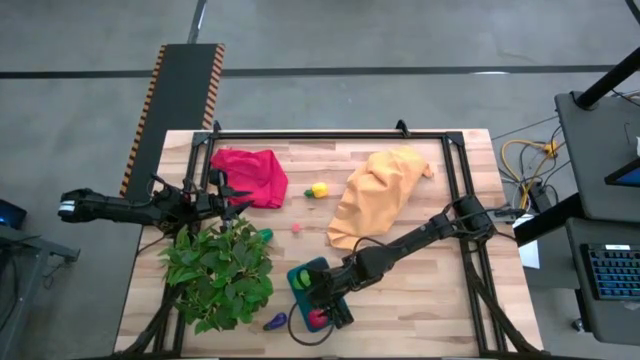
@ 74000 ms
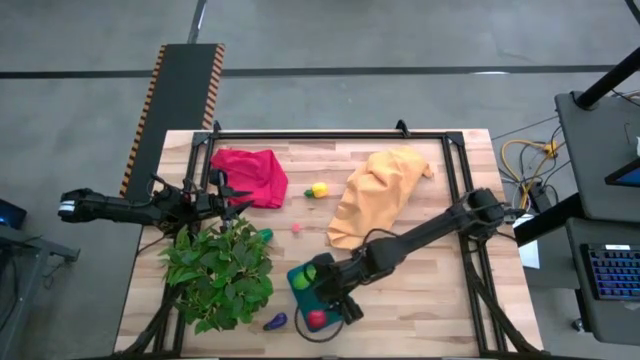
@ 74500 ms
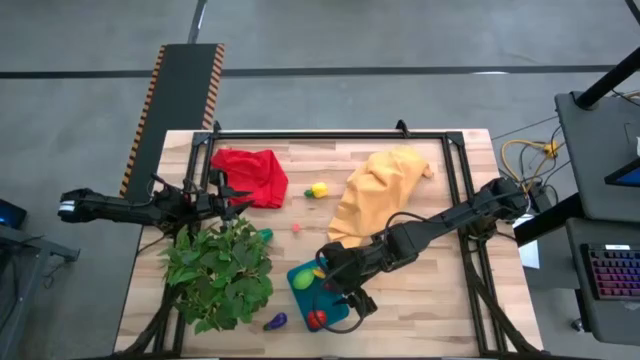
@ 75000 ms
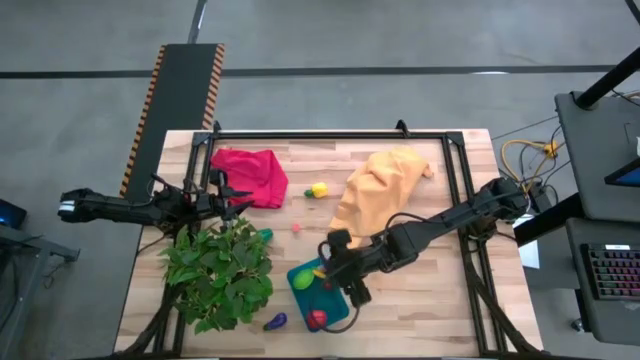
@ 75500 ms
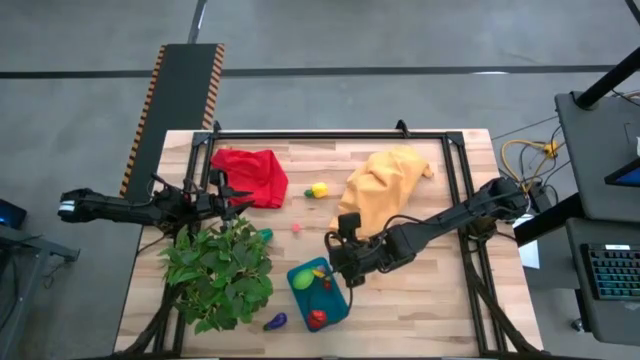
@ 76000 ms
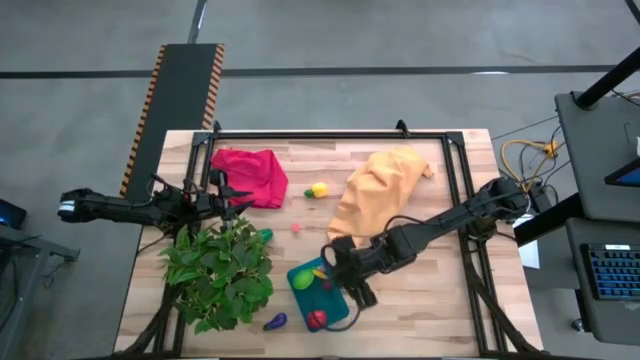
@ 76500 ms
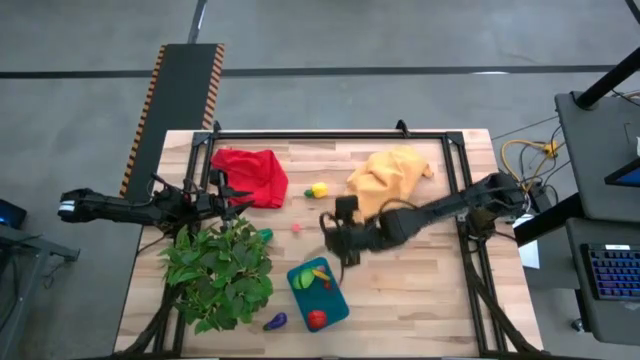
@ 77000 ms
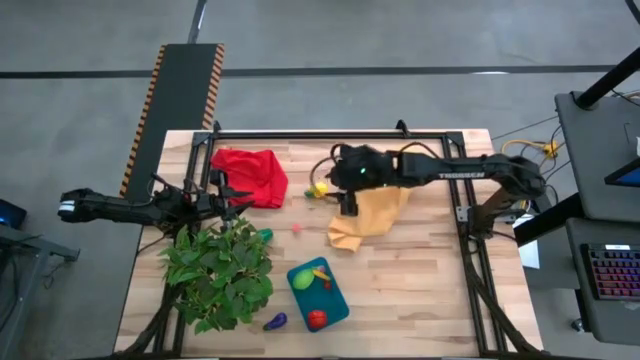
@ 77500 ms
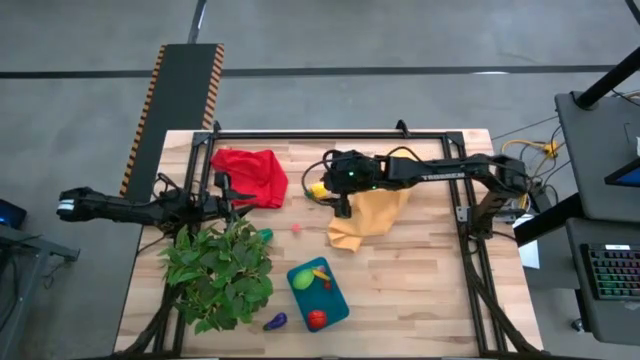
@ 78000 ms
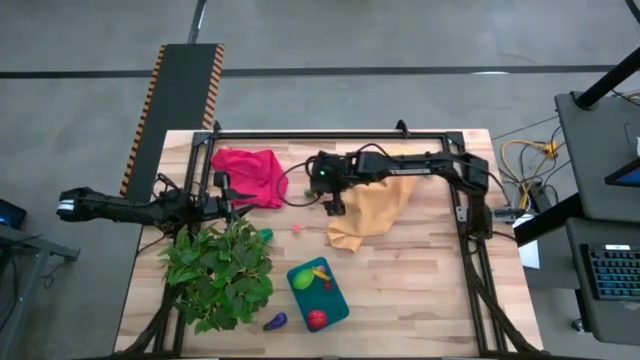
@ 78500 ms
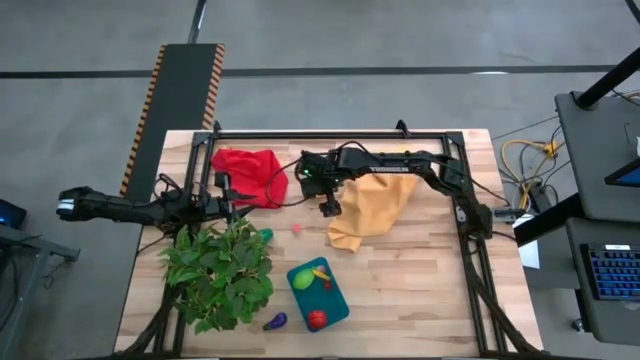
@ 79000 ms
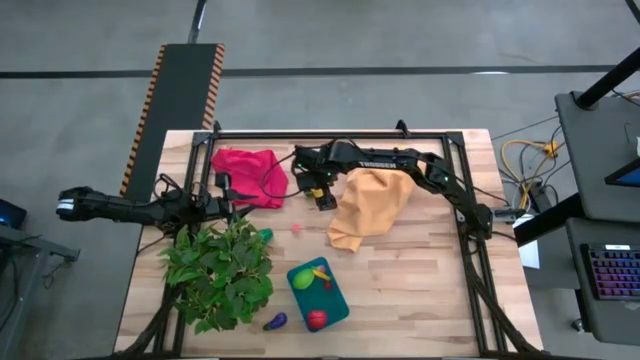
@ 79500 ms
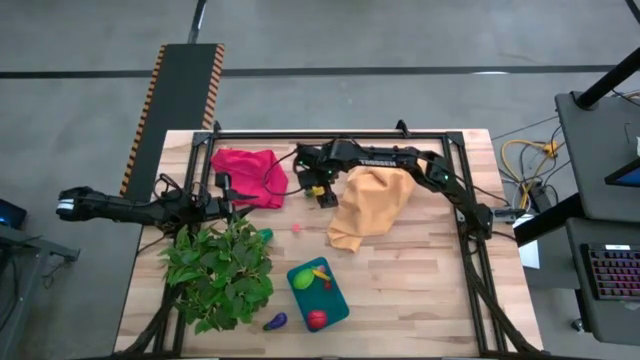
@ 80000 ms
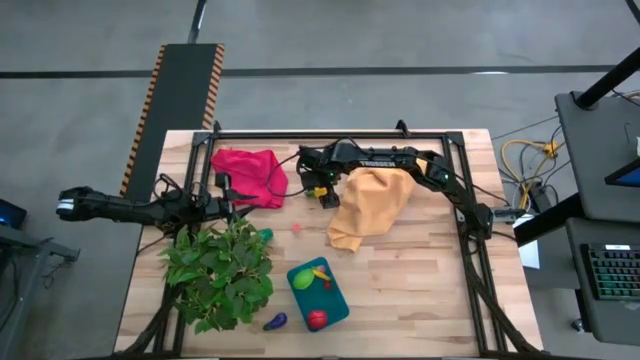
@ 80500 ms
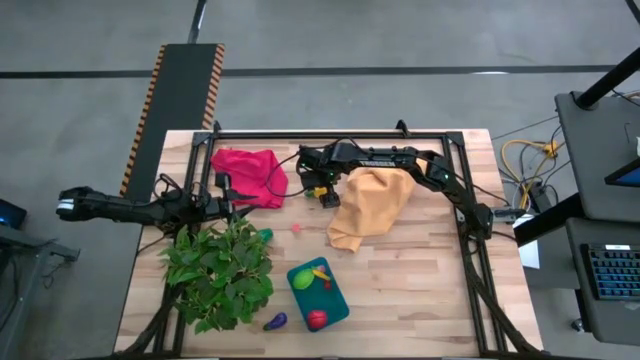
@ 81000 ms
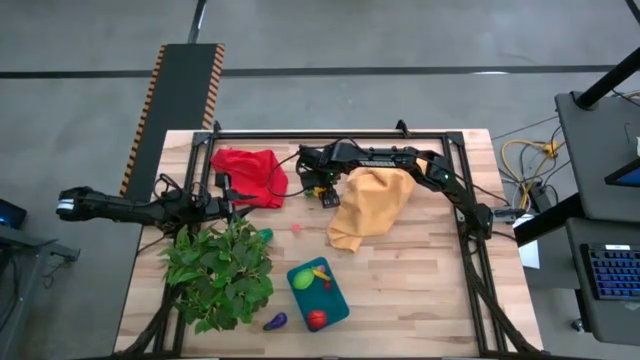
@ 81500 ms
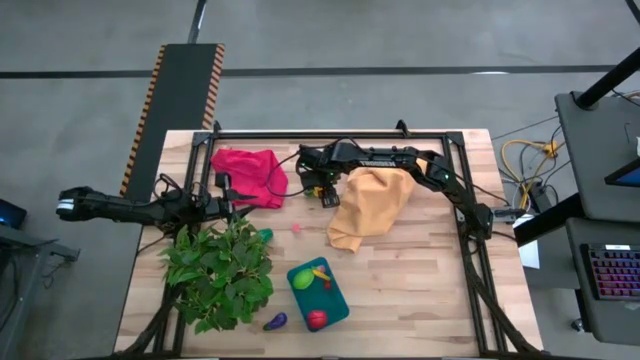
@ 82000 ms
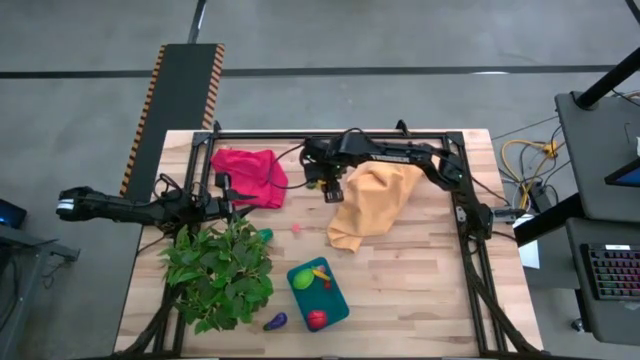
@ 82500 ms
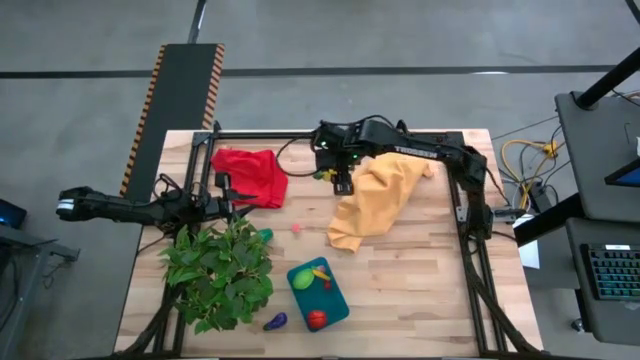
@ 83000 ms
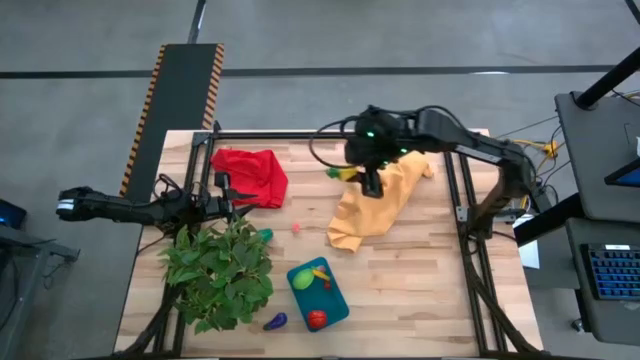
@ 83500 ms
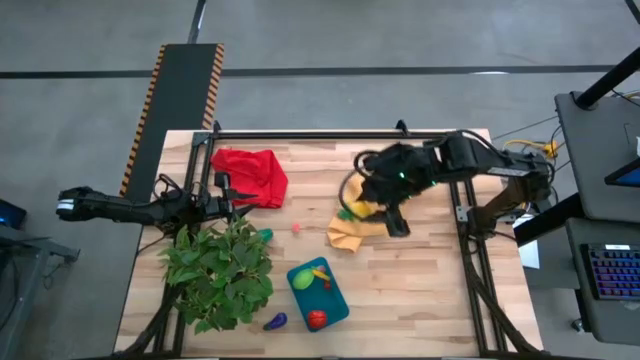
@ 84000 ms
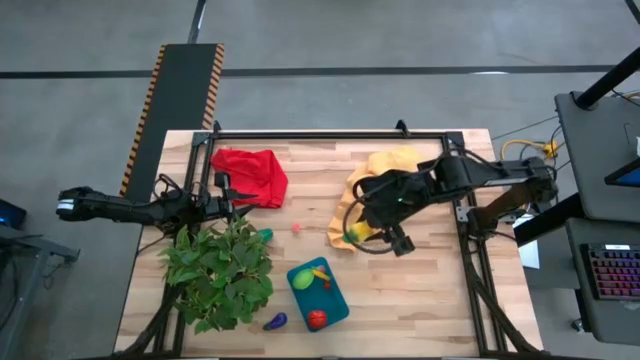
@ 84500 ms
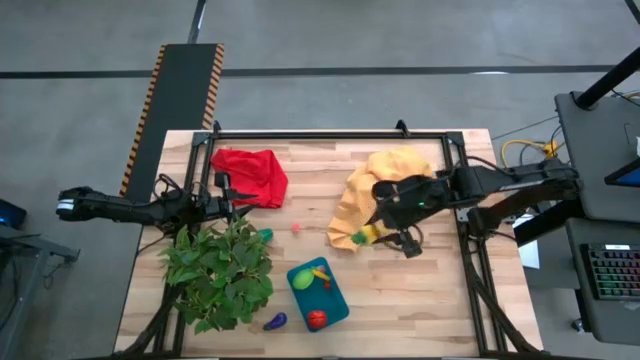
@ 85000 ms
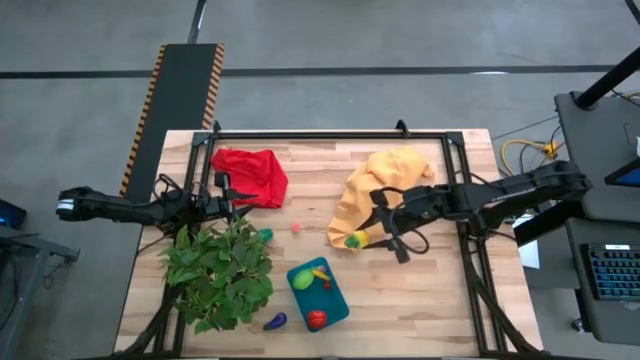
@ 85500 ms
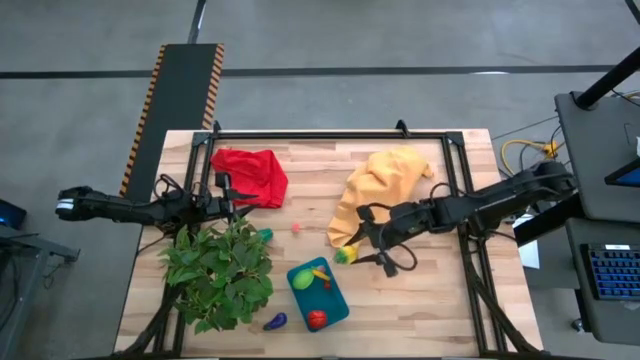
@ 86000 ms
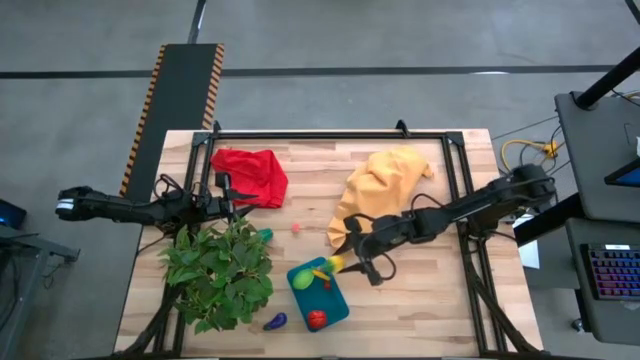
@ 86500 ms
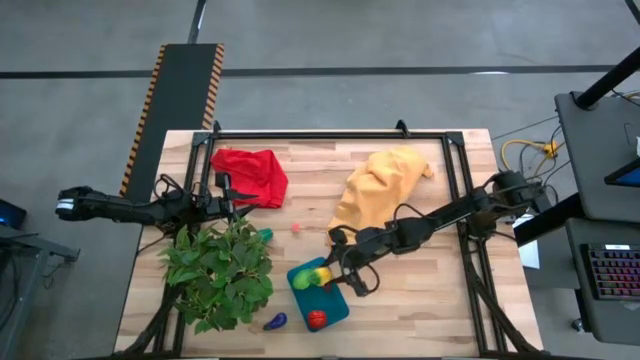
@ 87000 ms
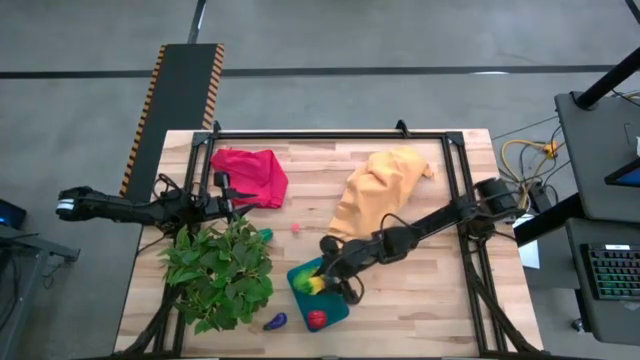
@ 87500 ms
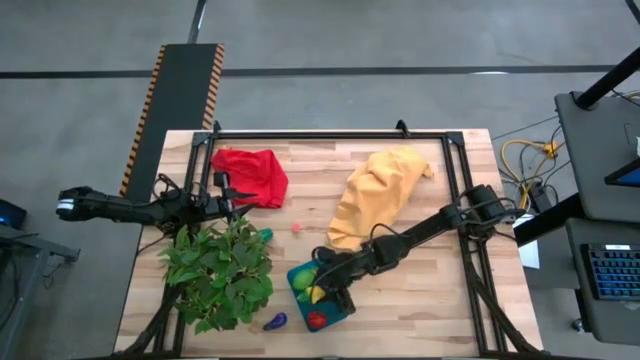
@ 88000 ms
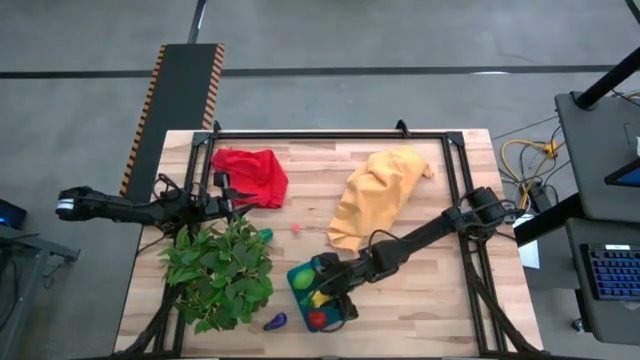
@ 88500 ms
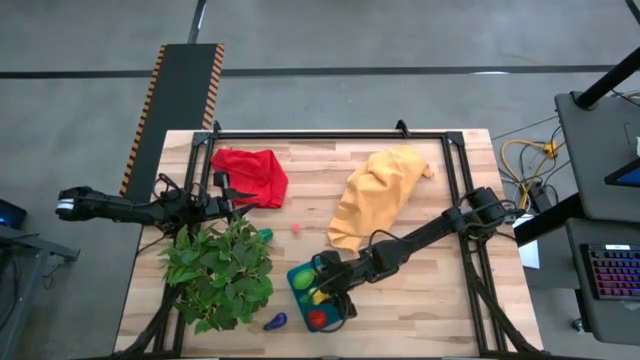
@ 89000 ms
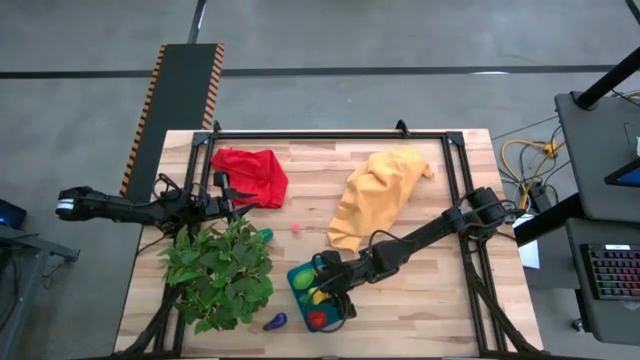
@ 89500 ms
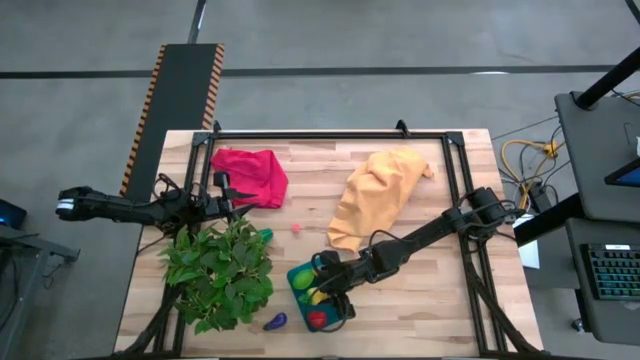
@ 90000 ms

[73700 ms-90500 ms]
Task: Pick and placing Produce into tupperware
Put the pineapple into the bin

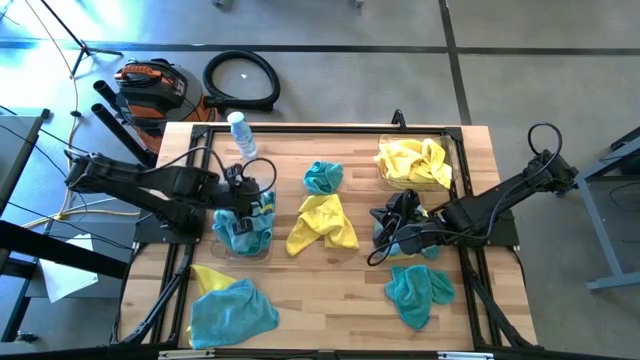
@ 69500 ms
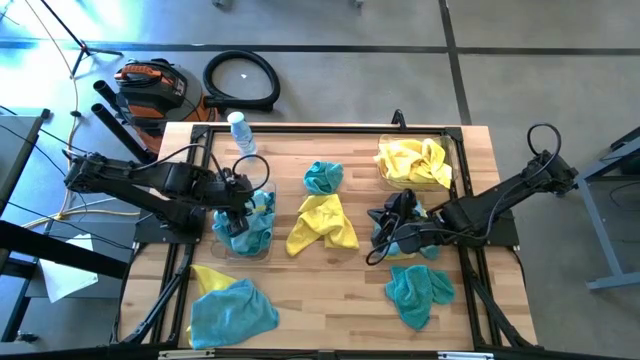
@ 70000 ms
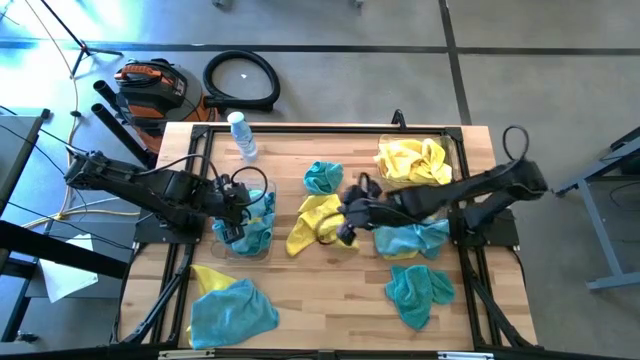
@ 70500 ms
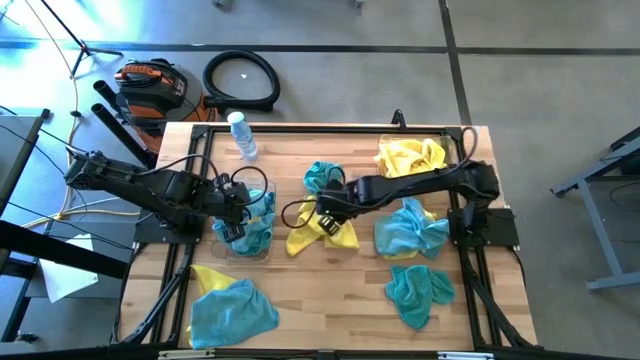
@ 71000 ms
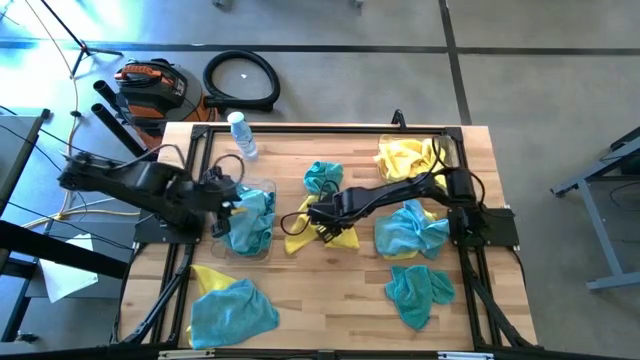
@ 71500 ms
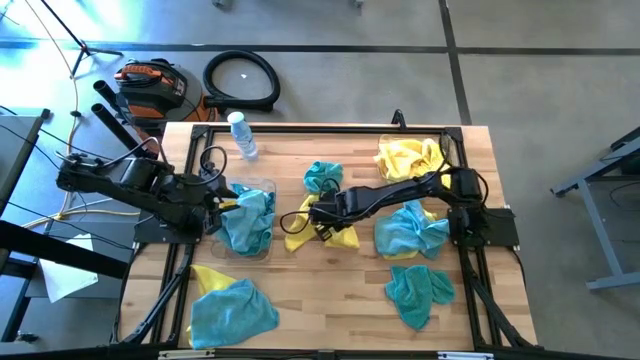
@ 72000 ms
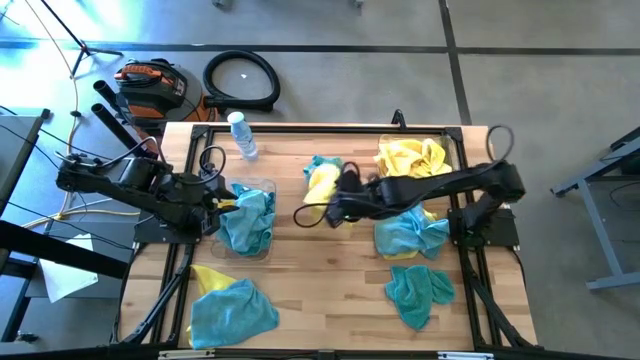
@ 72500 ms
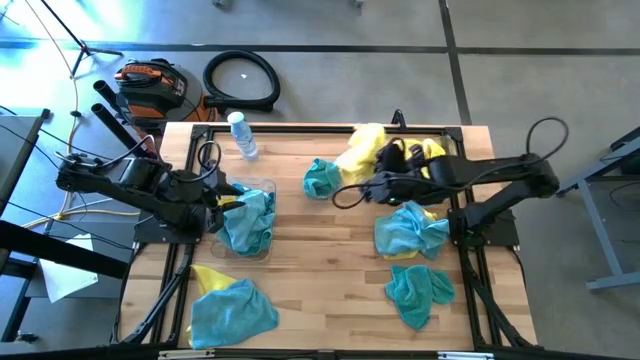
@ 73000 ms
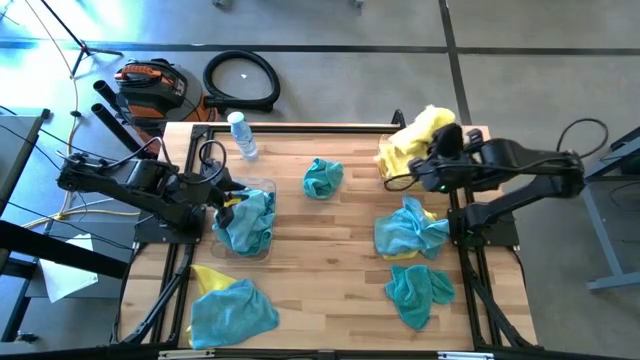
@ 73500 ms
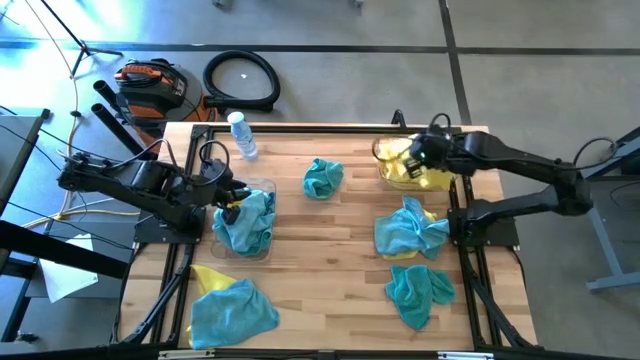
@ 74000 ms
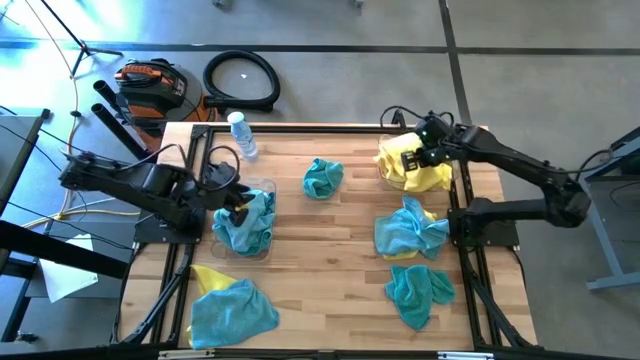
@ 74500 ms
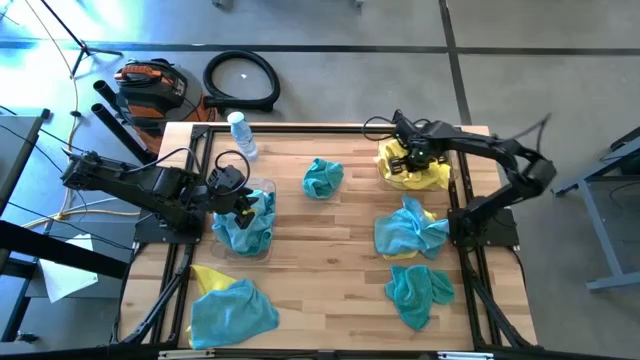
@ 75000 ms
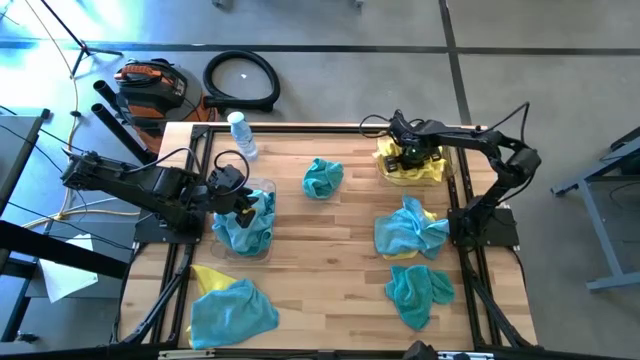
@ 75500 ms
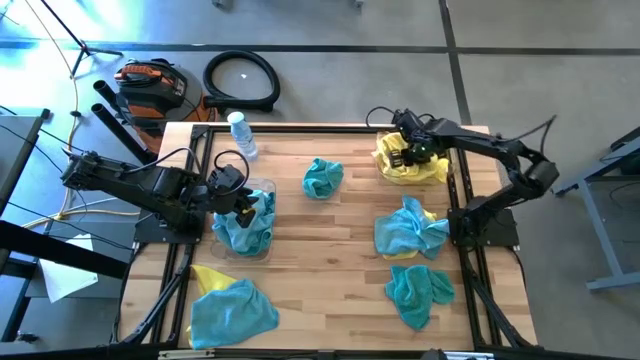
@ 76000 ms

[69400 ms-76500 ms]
Task: Sort microfiber towel by color & place in baskets
Put the yellow microfiber cloth into the right transparent bin
